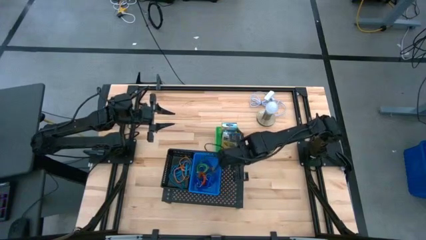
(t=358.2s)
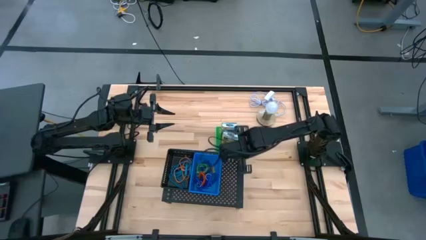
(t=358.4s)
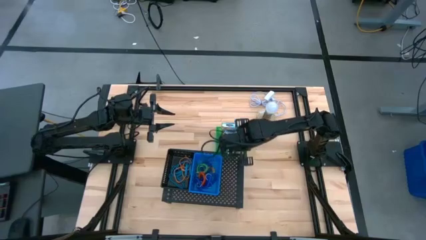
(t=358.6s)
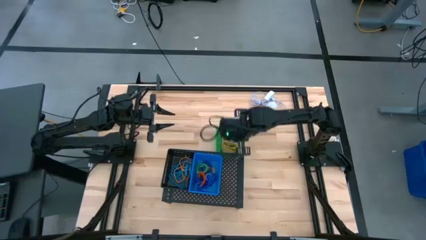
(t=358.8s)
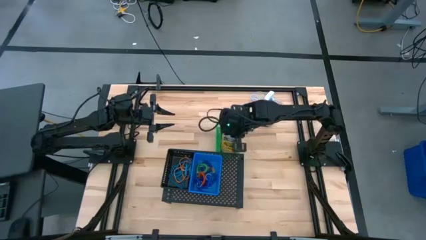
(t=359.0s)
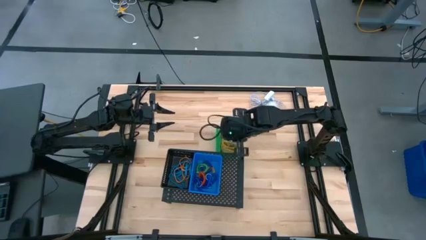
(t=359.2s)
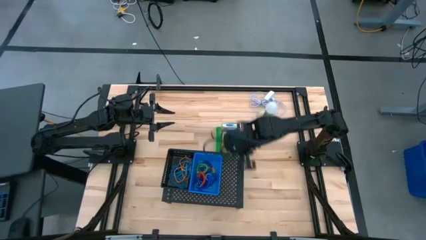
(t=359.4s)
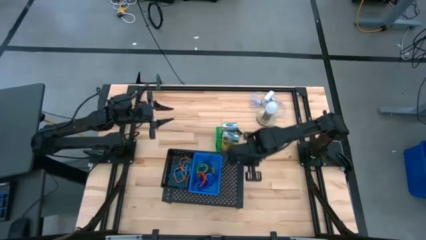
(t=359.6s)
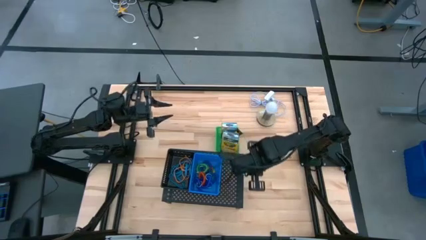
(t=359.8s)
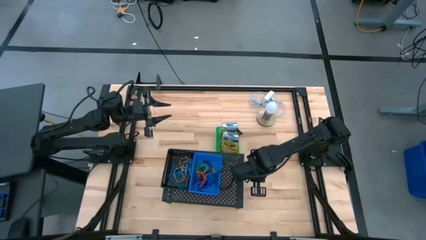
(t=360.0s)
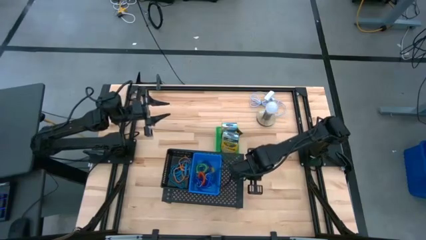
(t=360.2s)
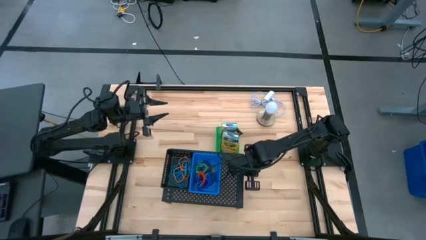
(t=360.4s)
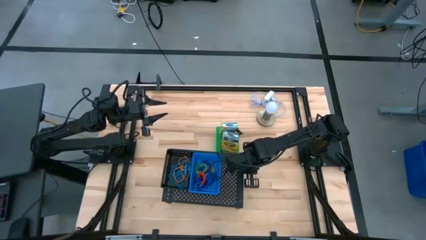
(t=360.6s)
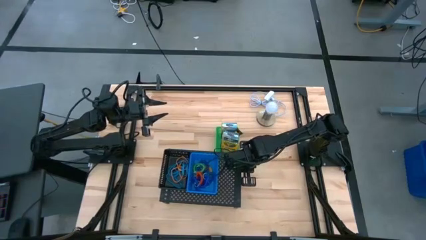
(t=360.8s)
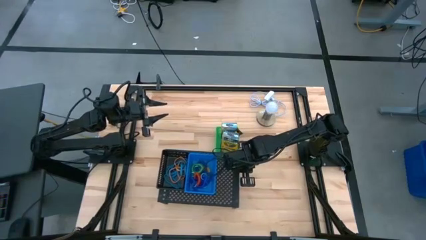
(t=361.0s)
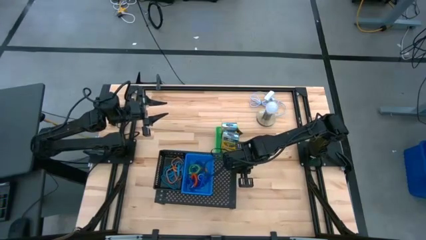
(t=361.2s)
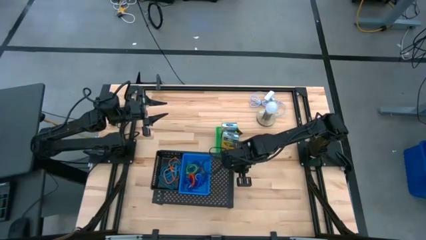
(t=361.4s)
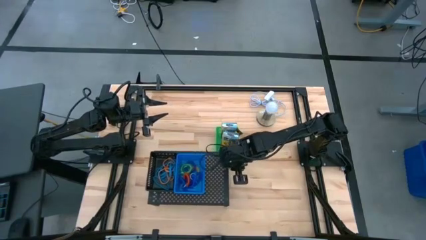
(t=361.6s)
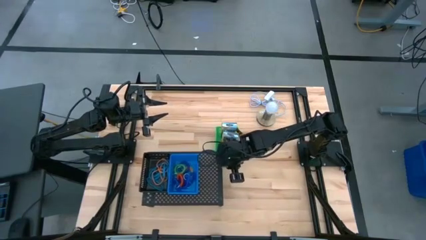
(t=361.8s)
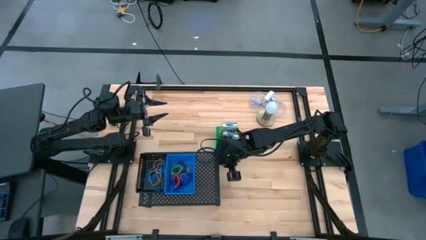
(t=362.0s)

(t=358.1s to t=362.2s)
Task: Pick & Place Office Desk Supplies
Adjust the shelf

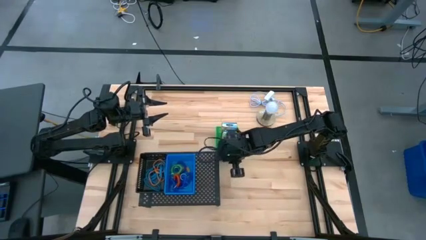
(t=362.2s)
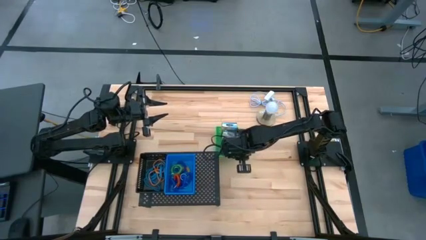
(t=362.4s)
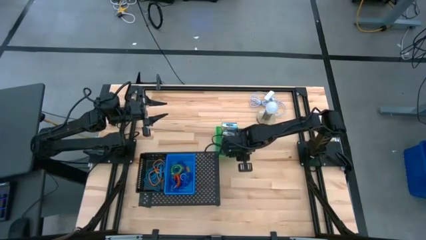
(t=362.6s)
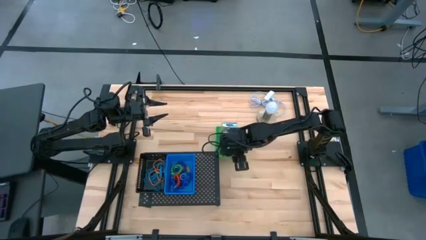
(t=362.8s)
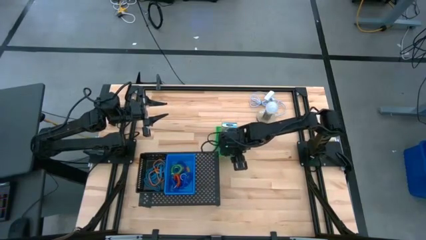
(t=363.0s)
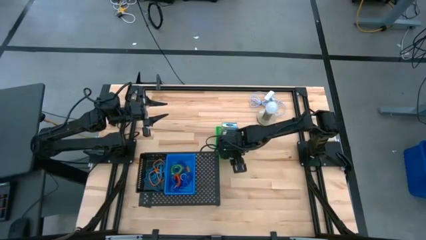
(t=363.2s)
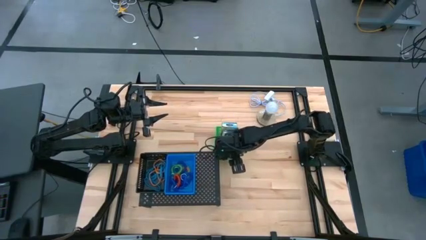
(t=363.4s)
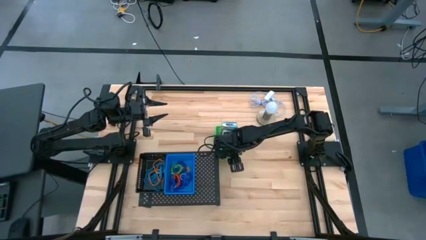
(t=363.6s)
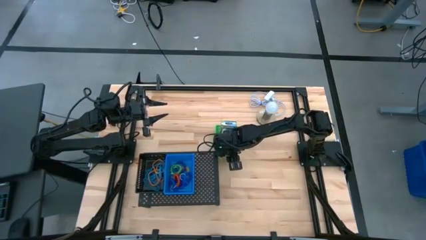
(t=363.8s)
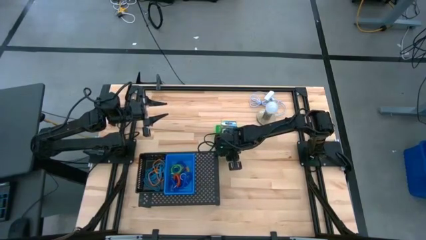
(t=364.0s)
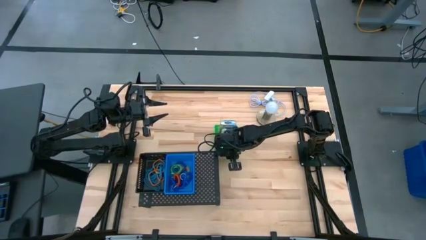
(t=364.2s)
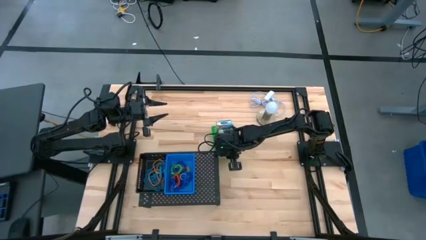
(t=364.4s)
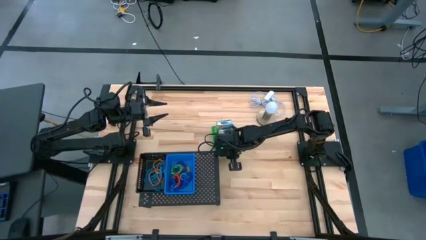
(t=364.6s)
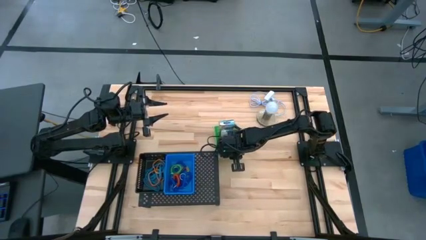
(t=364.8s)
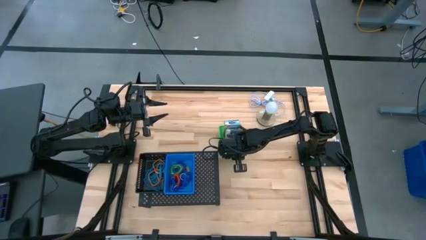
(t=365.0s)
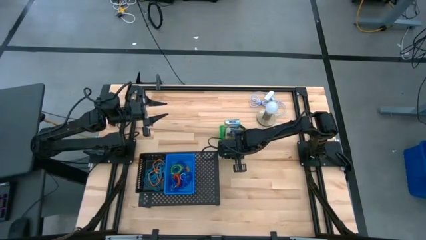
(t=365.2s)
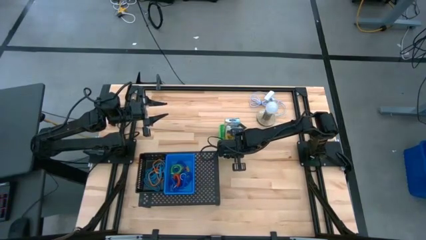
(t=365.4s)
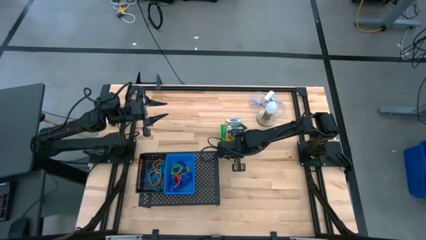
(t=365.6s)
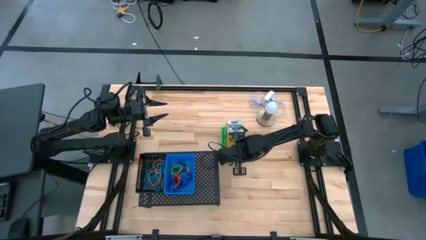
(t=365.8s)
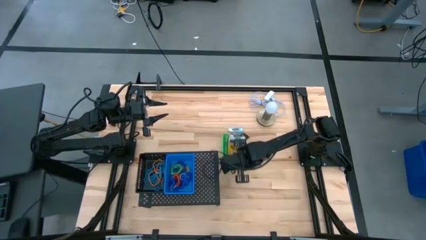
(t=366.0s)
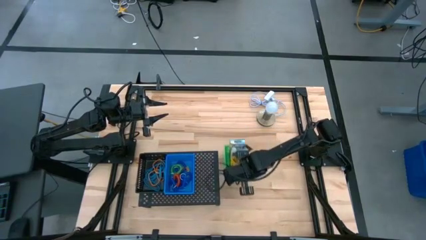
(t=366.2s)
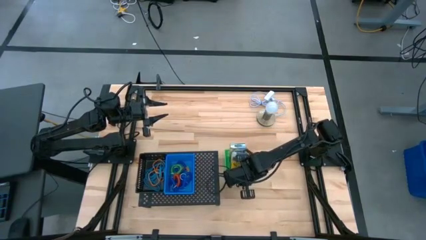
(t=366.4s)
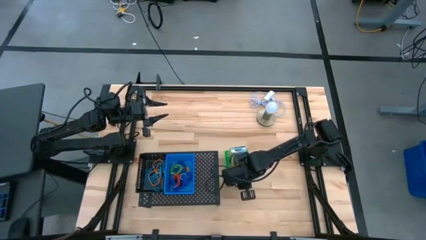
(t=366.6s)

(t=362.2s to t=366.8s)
Put the green bin with the crayon boxes on the shelf

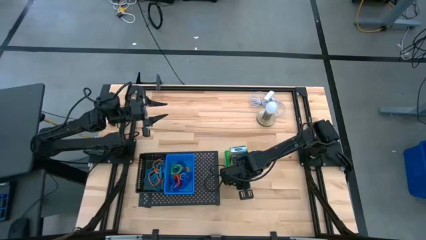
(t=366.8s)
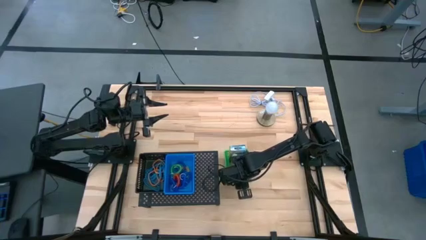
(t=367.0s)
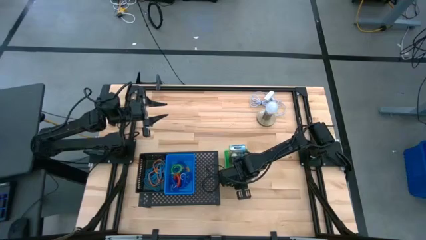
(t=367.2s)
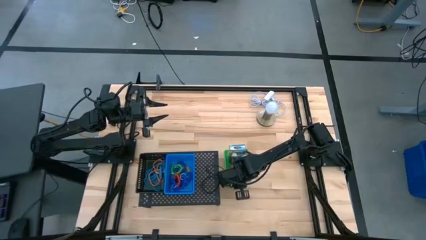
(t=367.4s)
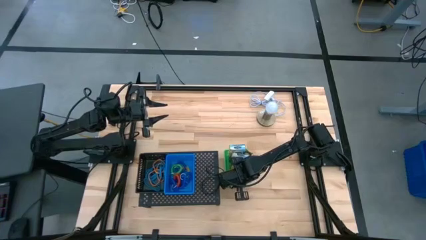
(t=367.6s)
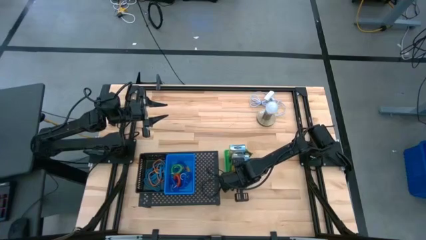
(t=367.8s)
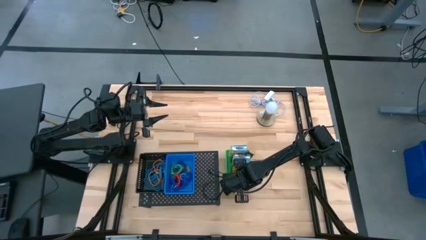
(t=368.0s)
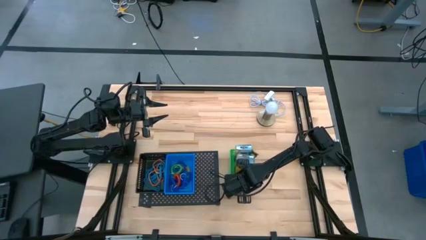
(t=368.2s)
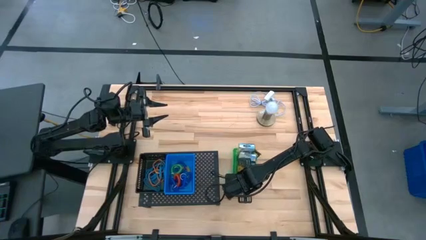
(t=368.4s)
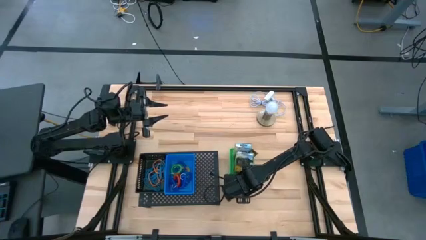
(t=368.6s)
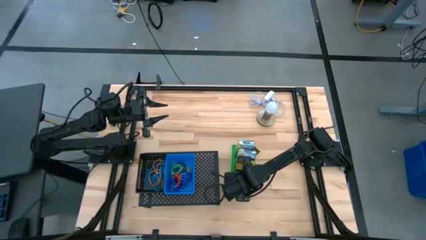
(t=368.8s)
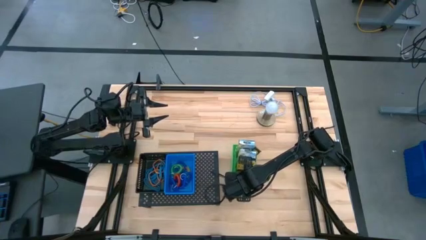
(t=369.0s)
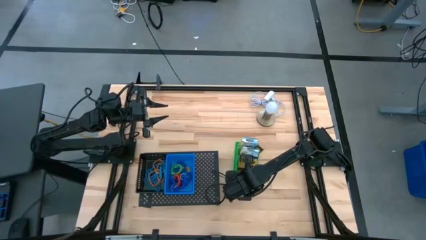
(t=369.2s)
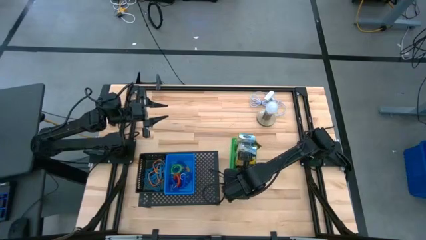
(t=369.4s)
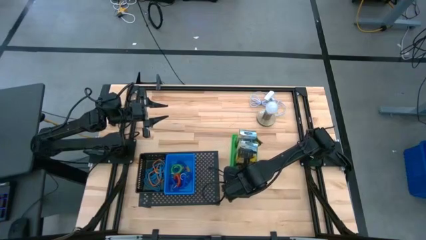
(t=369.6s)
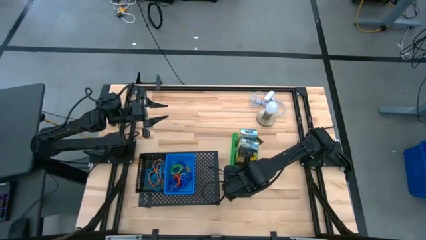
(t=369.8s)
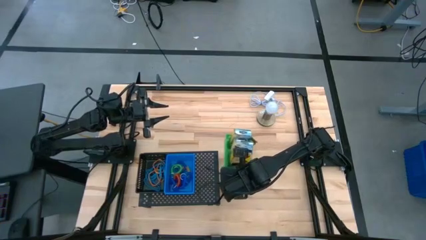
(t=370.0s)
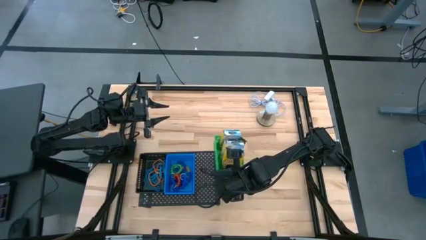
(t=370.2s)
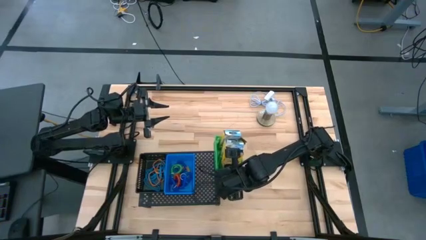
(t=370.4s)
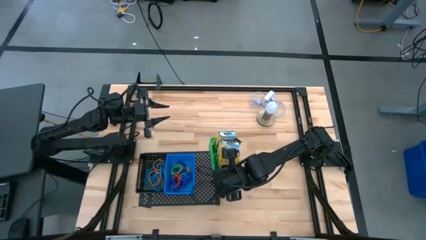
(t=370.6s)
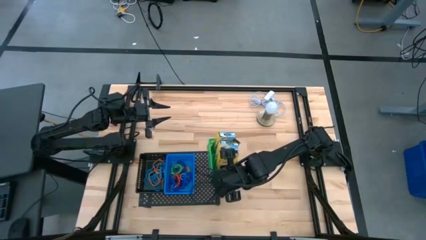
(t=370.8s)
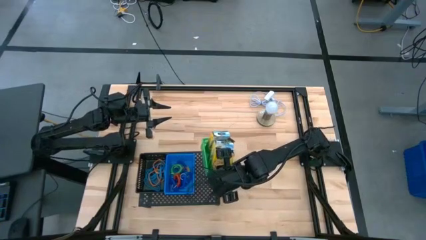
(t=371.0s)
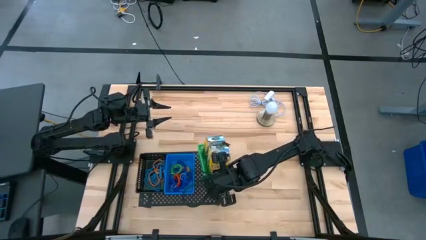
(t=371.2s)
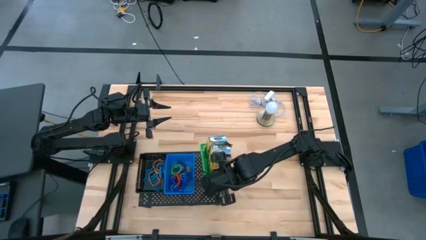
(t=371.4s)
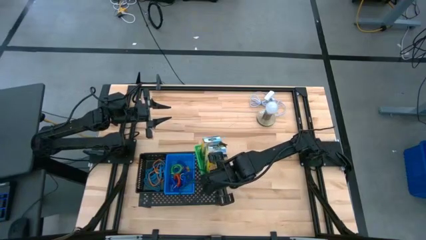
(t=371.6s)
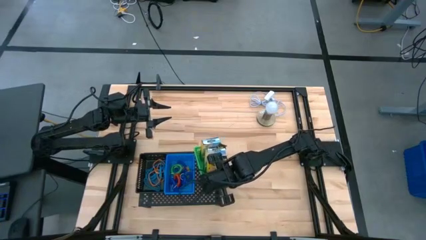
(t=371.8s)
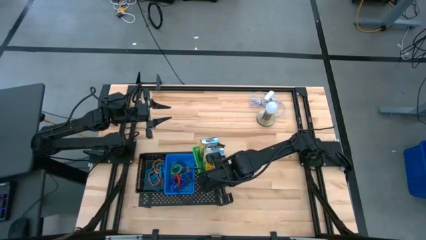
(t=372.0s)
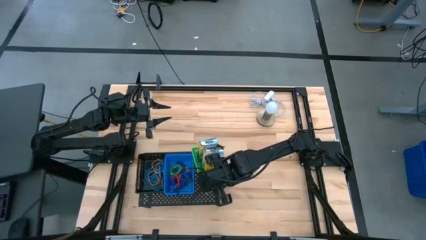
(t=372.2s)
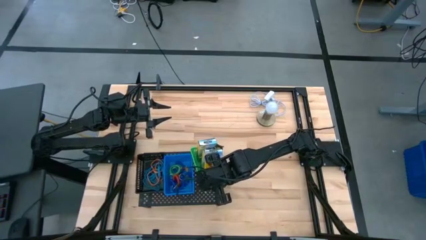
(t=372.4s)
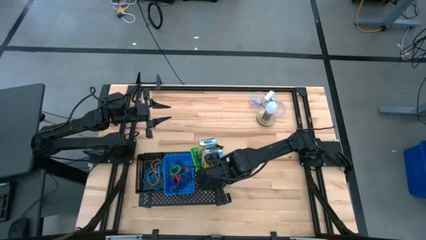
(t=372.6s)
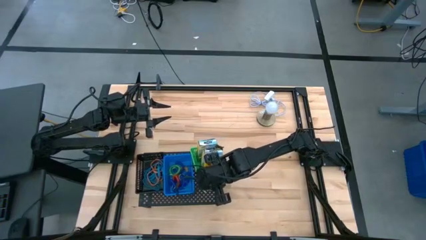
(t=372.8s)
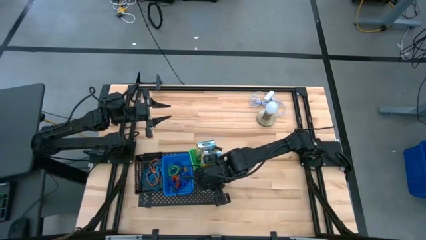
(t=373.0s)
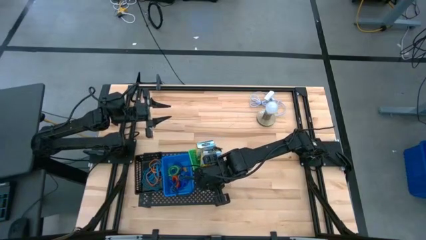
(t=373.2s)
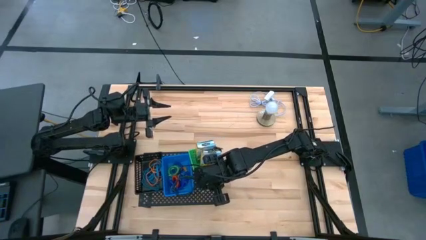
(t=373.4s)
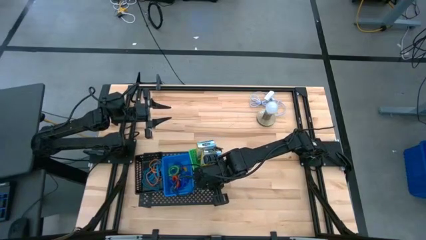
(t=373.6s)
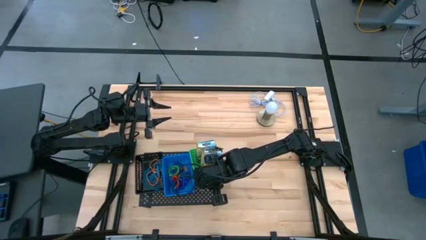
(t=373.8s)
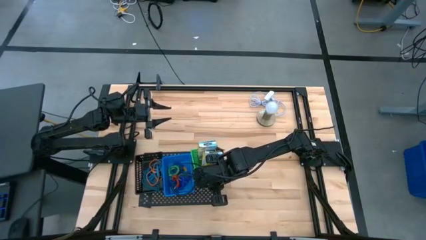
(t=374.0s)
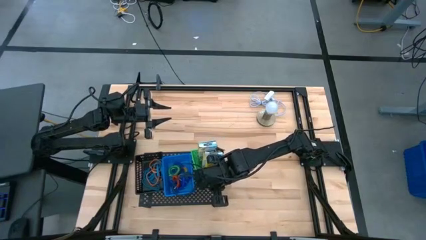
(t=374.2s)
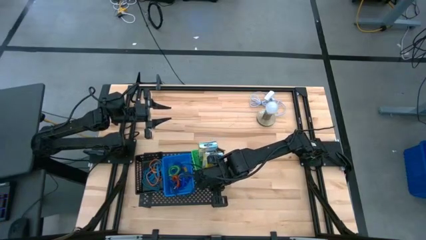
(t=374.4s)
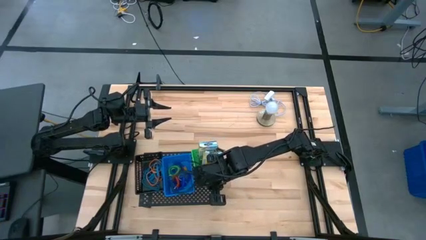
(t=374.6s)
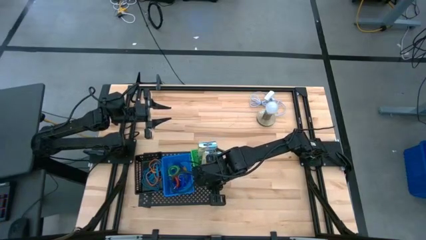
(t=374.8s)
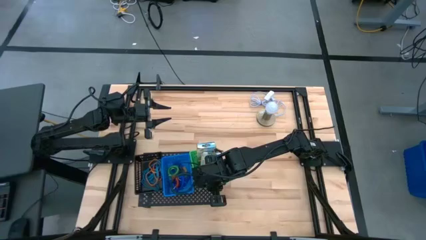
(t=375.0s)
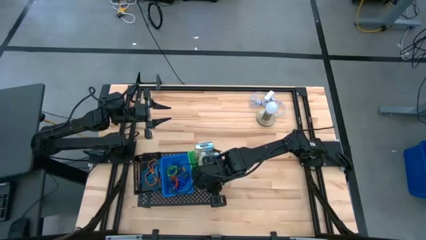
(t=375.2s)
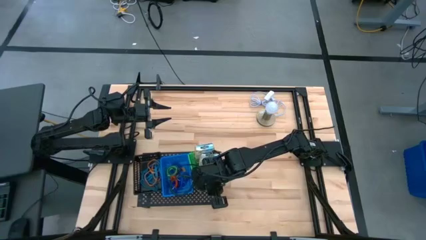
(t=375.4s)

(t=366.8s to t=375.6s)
Put the green bin with the crayon boxes on the shelf
